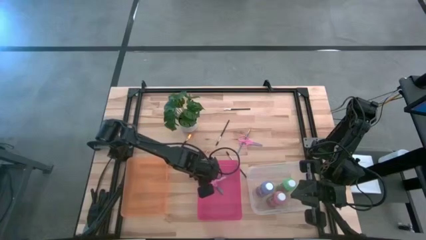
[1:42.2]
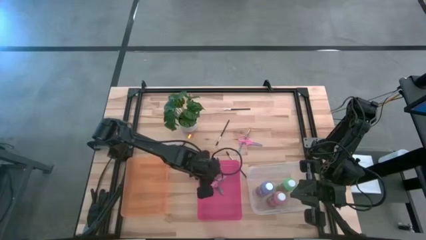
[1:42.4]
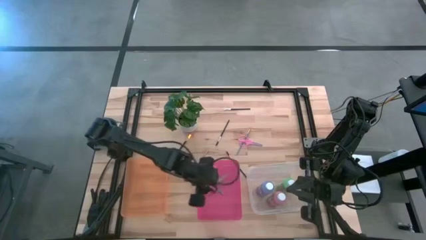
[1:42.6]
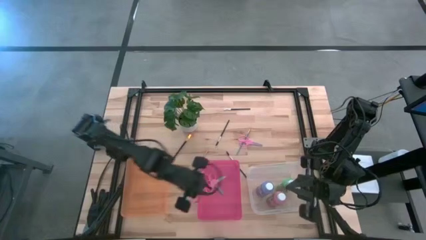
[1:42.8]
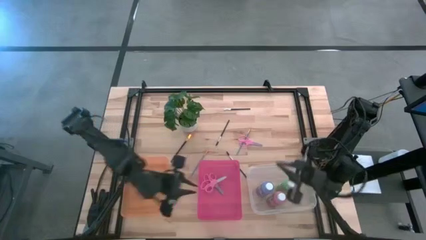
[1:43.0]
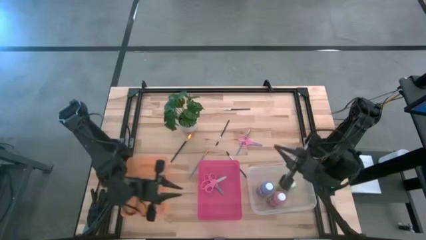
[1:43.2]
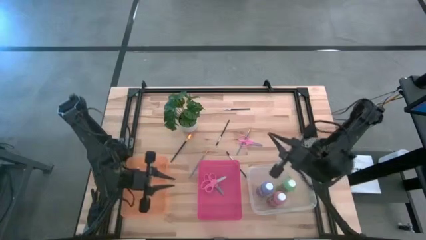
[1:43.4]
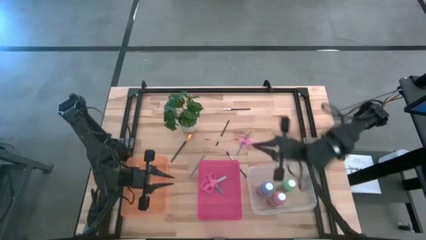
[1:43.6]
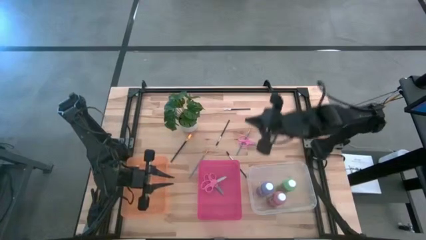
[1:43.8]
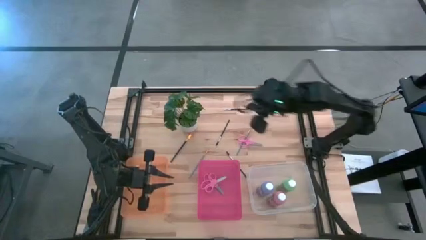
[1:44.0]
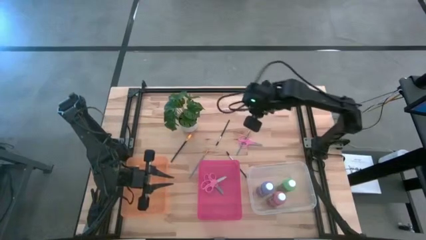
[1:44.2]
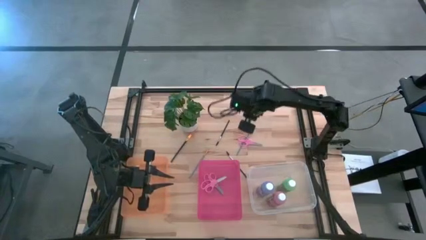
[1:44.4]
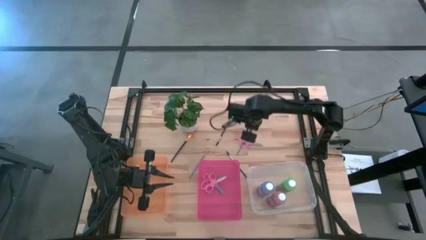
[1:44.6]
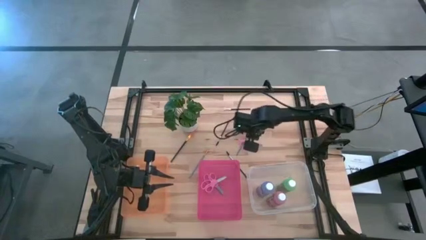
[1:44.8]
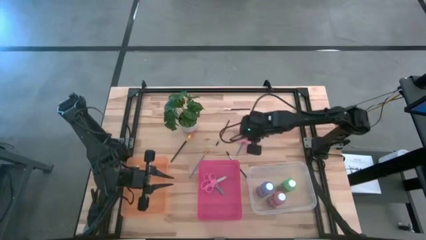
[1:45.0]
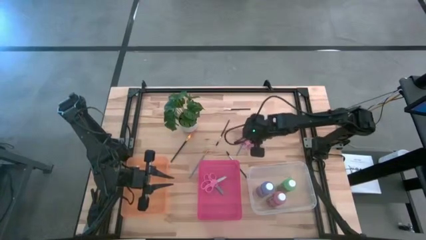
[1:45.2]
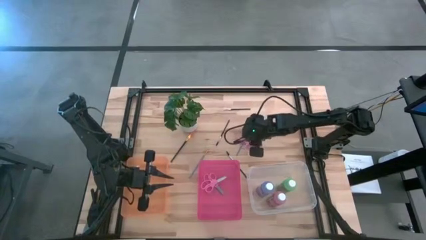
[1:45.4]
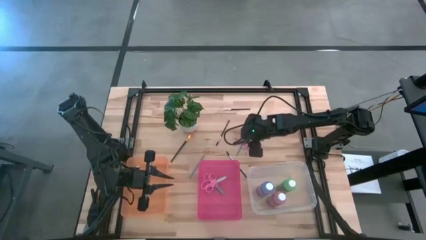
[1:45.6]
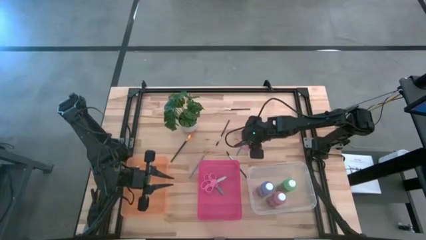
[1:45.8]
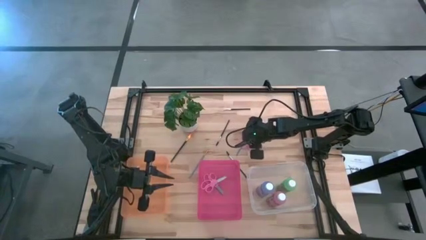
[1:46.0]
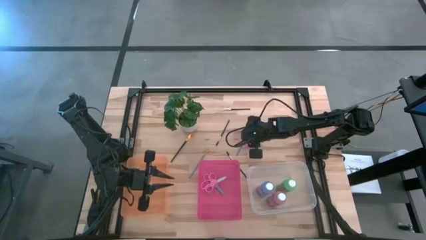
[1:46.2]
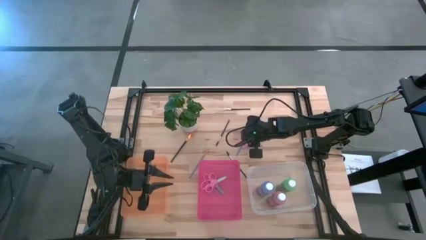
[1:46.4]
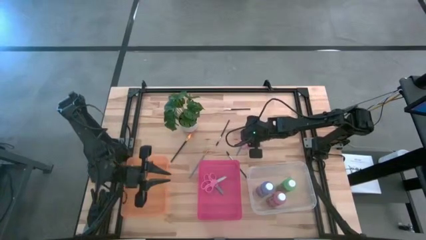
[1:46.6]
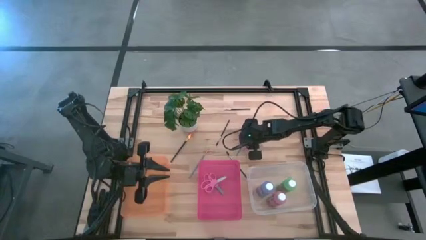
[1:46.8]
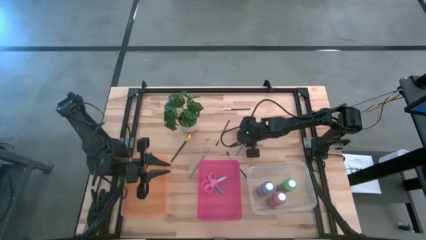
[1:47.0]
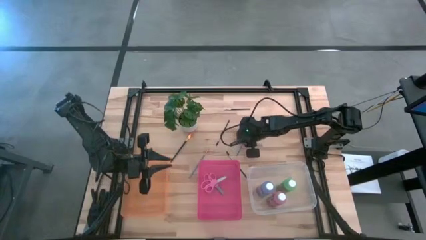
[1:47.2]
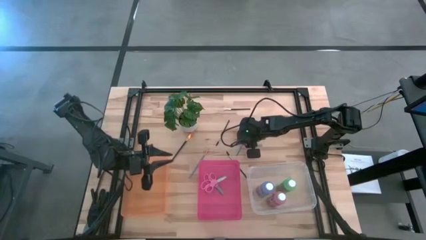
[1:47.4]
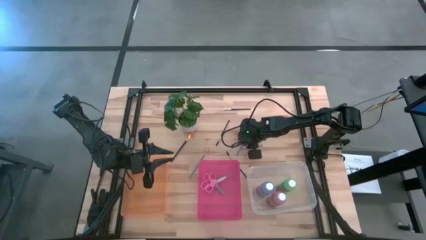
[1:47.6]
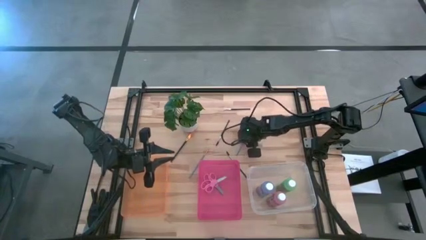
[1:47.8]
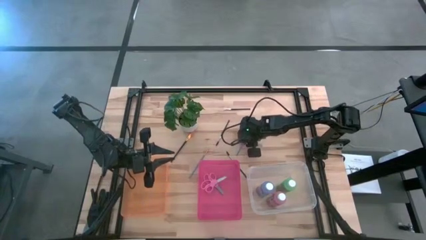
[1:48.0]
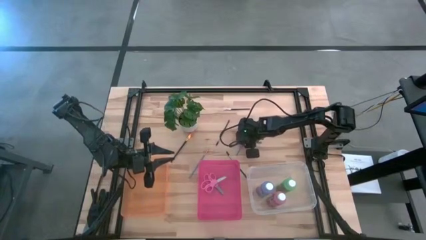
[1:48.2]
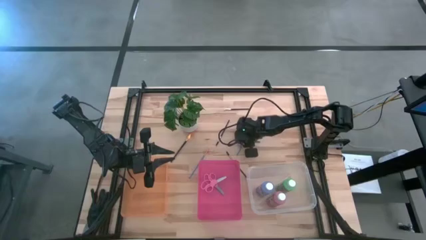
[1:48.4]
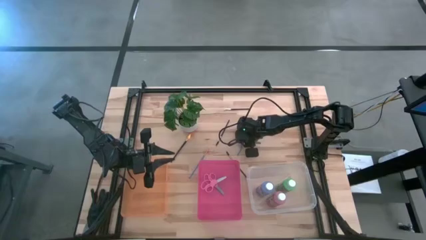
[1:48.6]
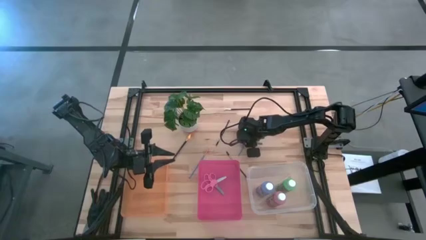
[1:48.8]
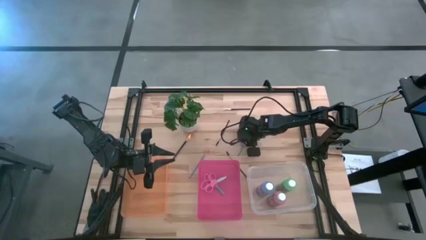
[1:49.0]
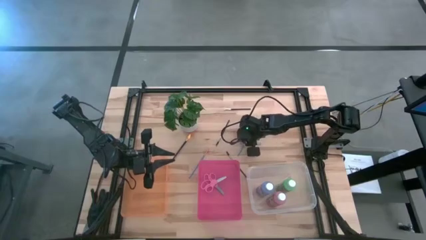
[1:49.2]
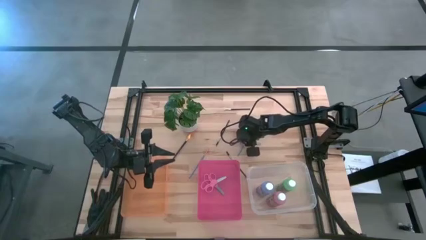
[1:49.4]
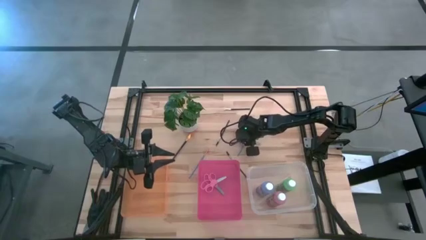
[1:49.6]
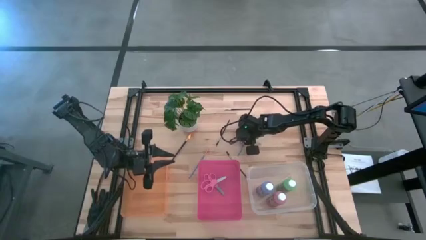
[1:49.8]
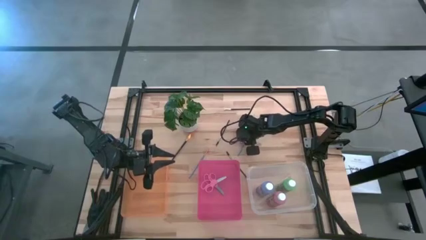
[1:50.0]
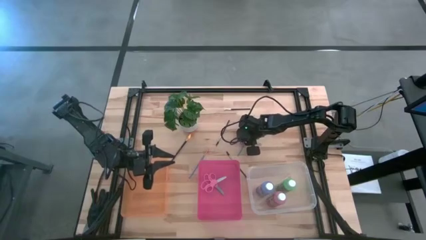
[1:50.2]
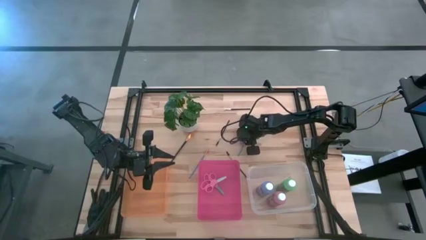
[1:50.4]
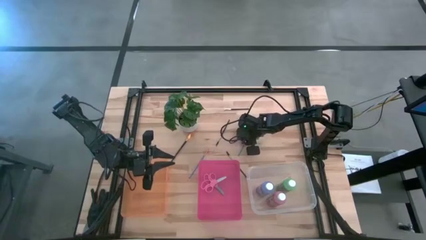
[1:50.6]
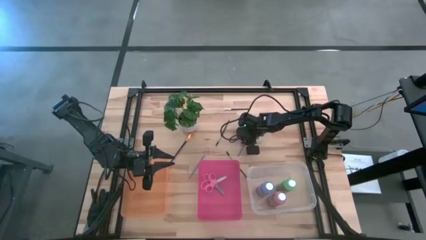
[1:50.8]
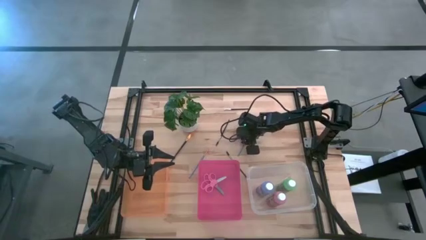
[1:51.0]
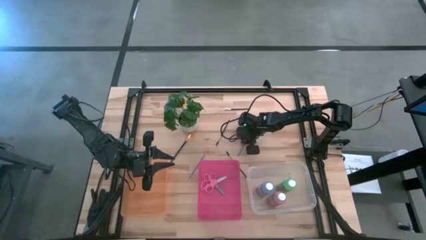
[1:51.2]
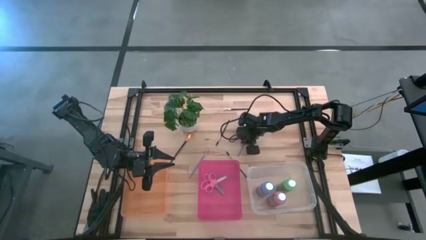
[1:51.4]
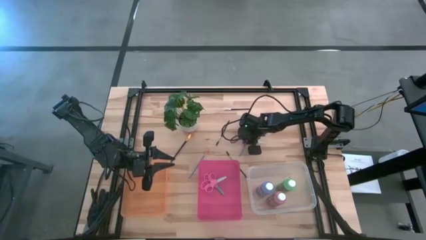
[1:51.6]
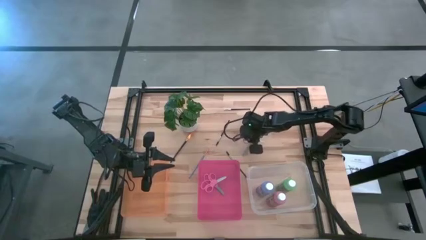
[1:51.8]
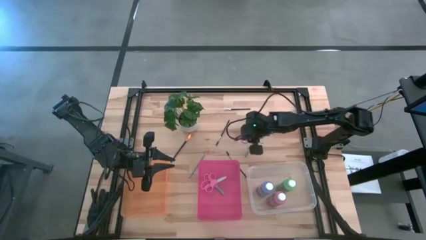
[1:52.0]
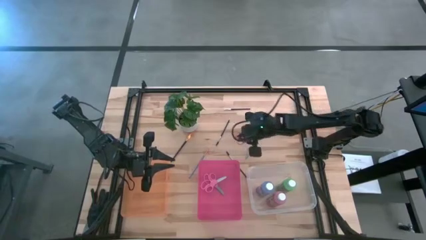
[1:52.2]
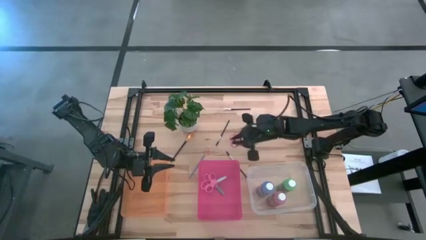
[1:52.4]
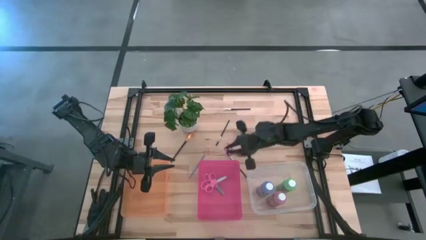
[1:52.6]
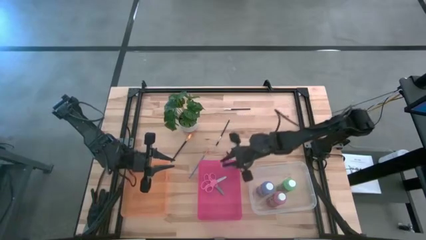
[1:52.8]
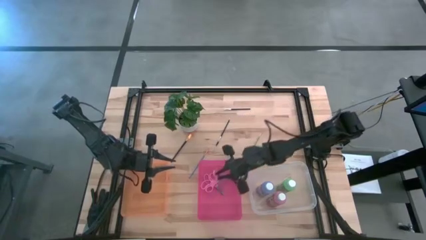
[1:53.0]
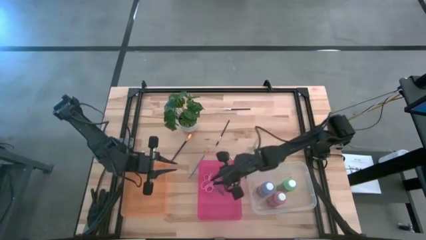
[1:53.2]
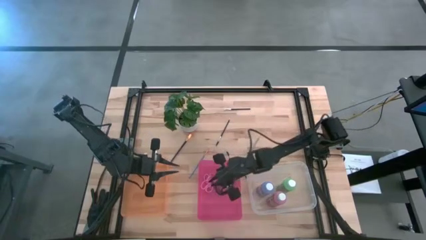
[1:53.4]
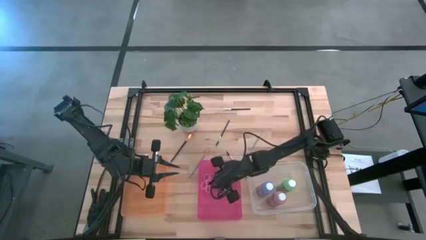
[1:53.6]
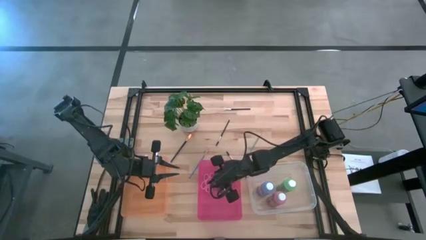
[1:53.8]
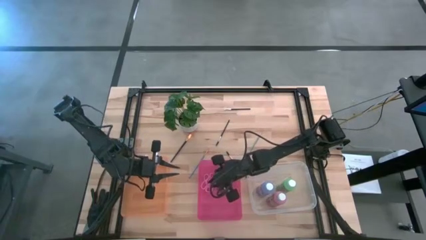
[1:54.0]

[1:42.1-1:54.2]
Task: Pick & Place Paint Supplies
Put the pink scissors into the pink bin

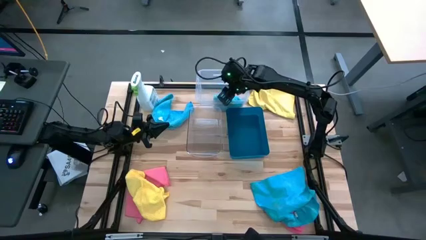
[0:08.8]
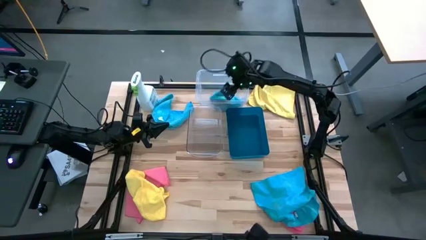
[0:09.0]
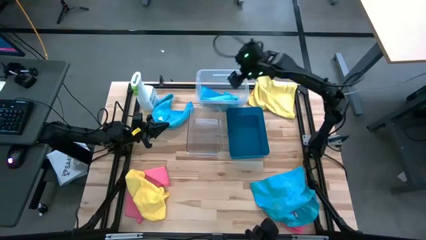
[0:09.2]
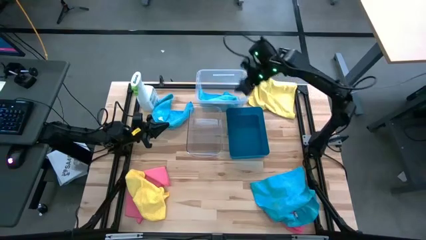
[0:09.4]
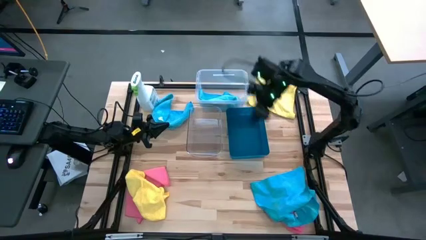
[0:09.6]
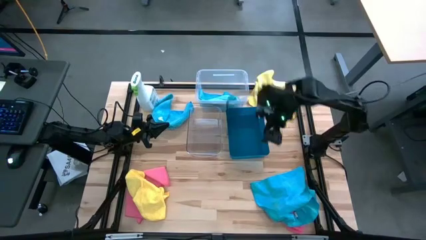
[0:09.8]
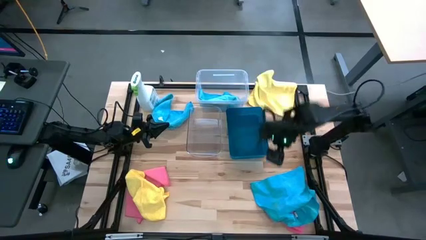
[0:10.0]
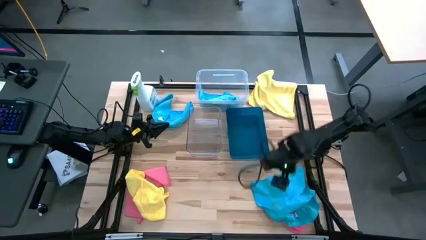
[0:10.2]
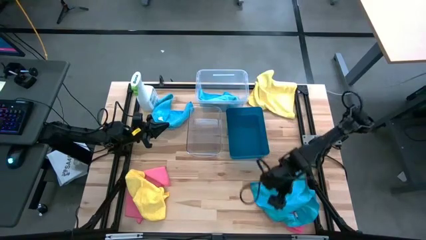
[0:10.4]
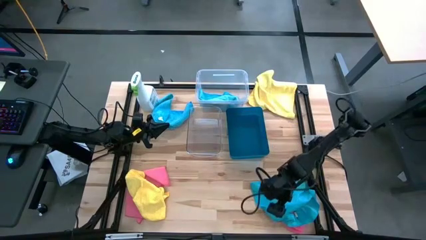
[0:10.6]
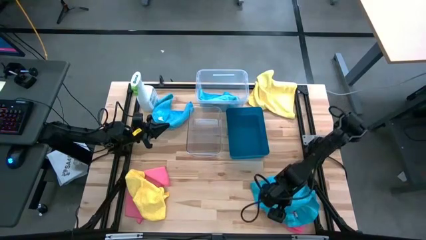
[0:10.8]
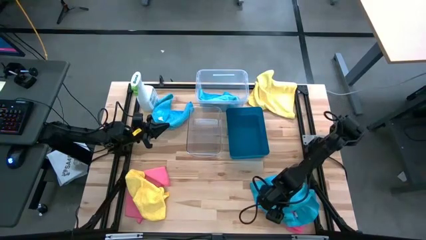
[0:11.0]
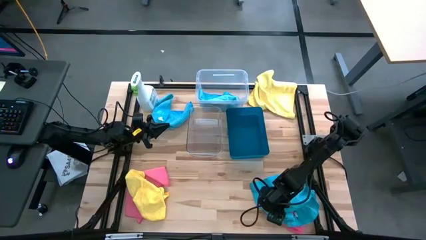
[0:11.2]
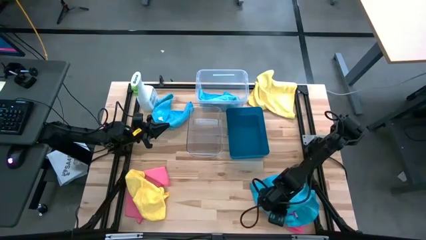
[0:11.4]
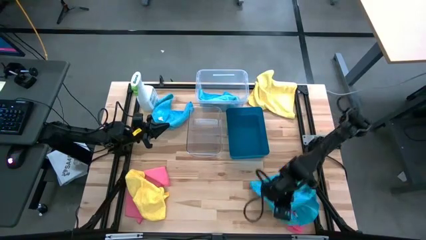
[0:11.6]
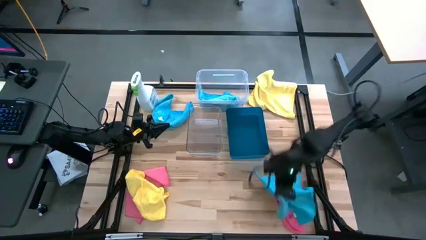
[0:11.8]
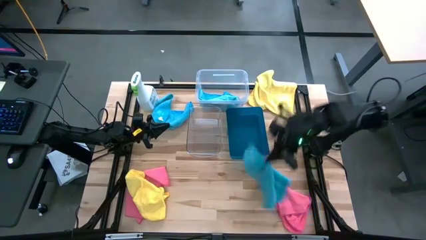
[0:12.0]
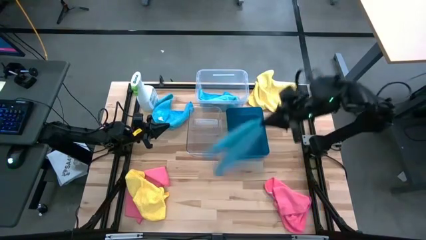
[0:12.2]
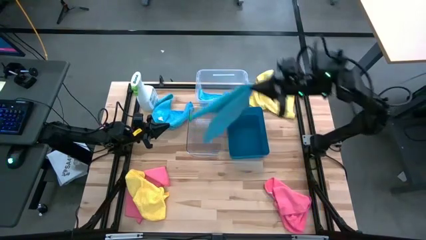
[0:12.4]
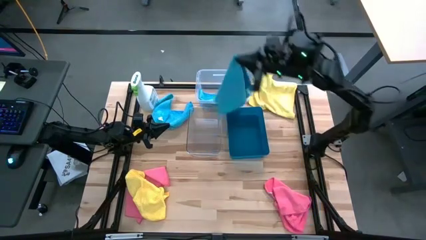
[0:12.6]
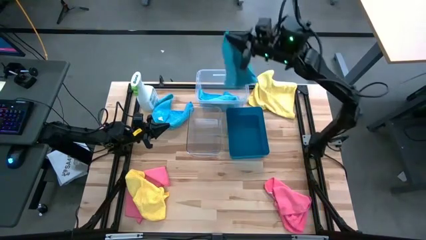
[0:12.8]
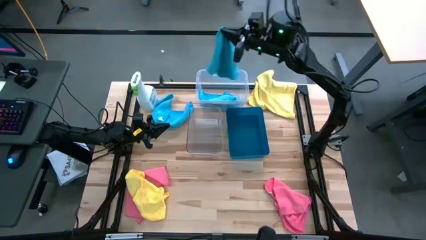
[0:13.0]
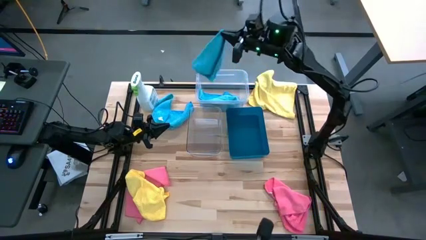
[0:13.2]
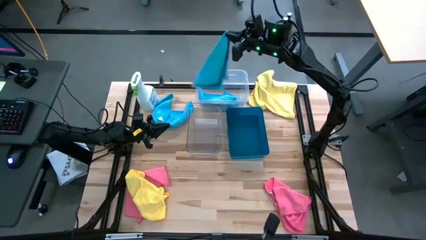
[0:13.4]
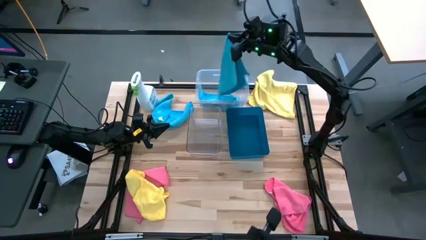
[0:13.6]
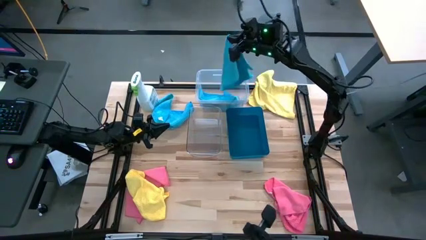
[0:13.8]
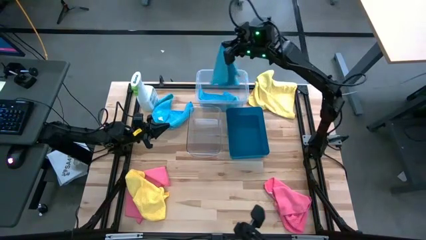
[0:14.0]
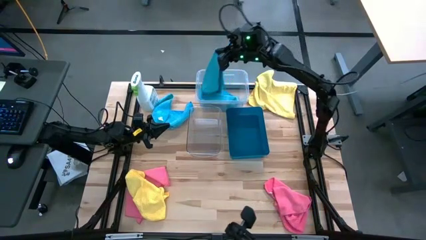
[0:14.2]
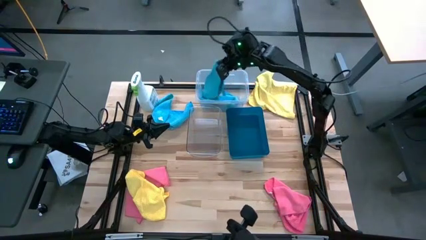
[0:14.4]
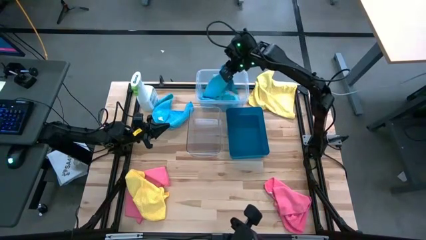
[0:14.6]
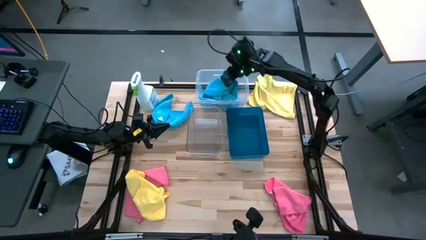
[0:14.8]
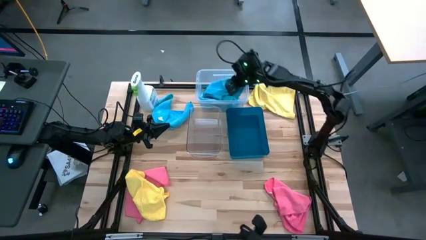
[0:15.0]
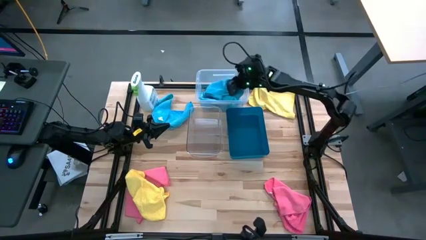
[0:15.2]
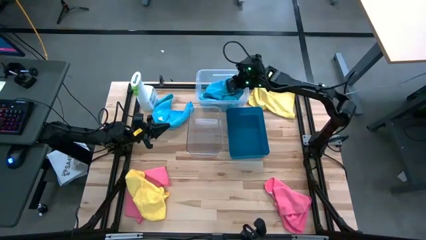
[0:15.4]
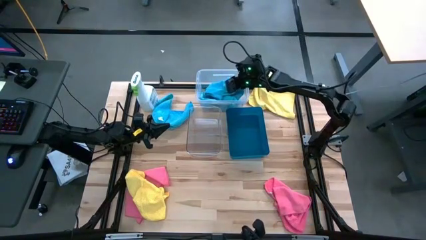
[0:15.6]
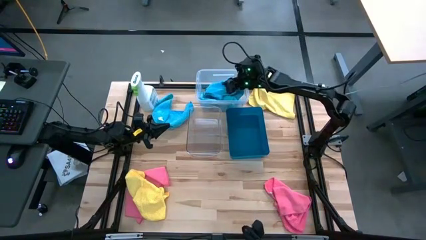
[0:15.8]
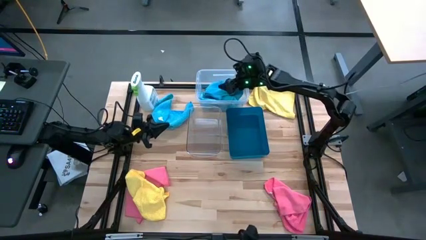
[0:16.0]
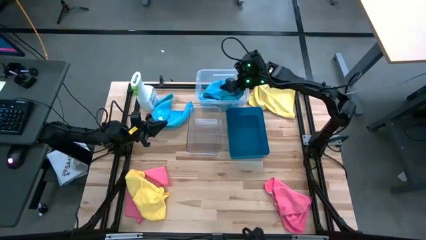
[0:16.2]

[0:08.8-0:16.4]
Task: Sort microfiber towel by color & place in baskets
Put the bottom blue towel into the top transparent bin
